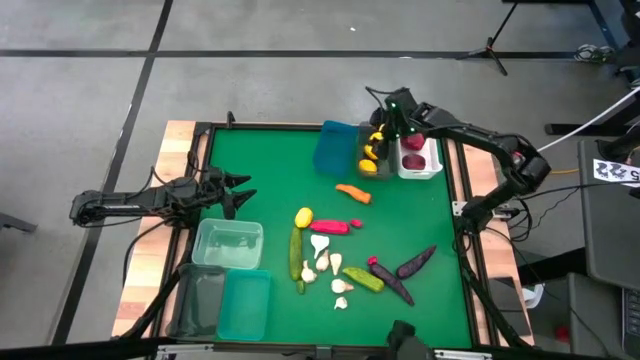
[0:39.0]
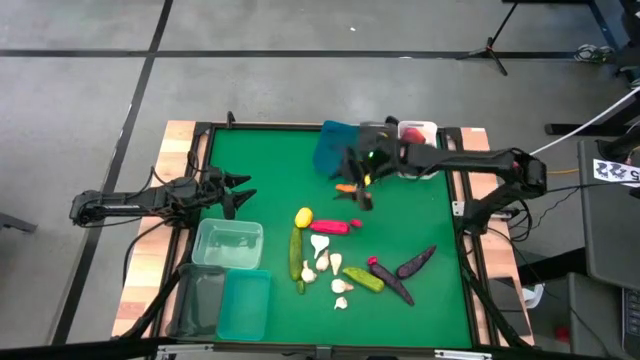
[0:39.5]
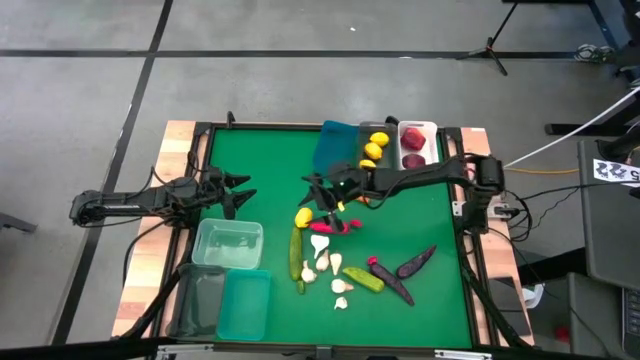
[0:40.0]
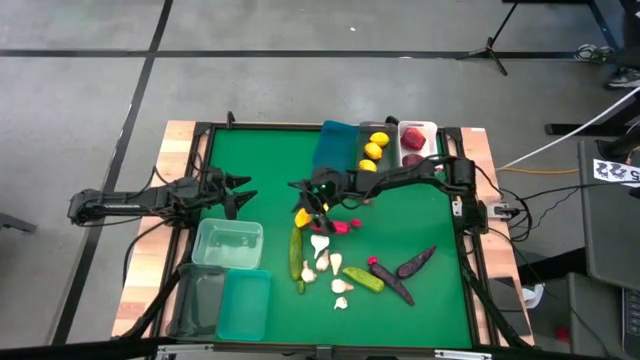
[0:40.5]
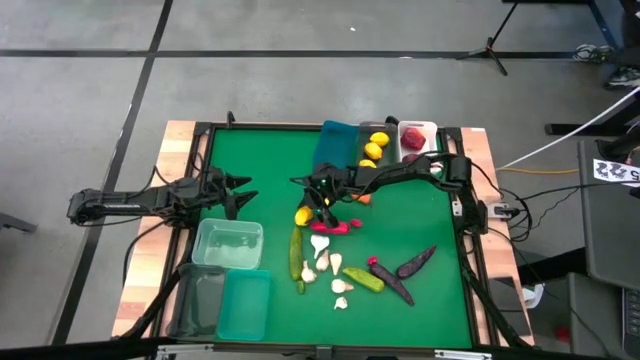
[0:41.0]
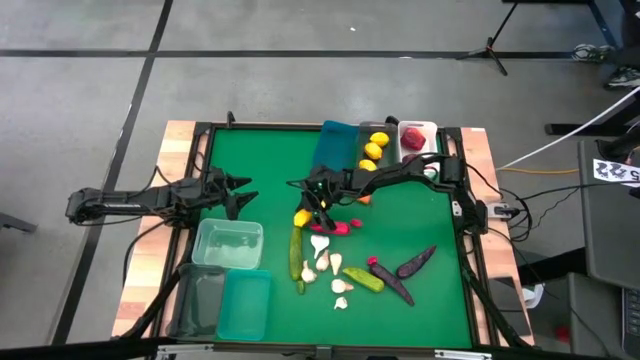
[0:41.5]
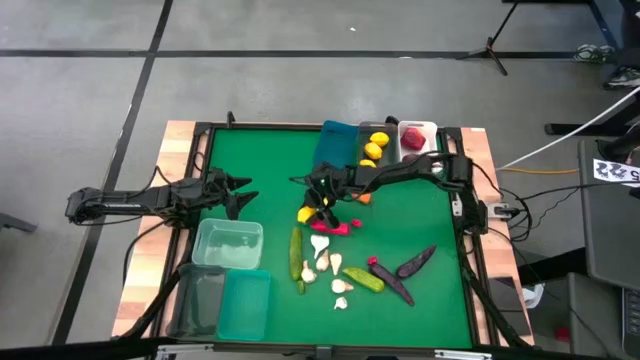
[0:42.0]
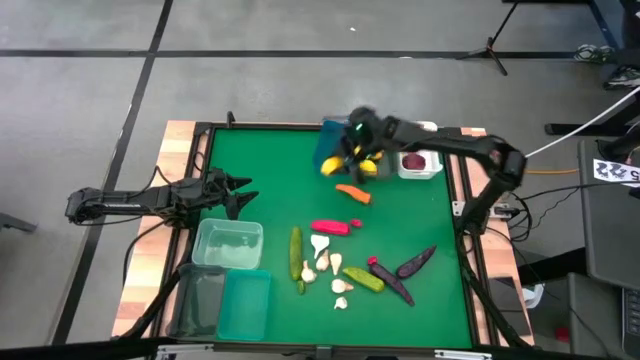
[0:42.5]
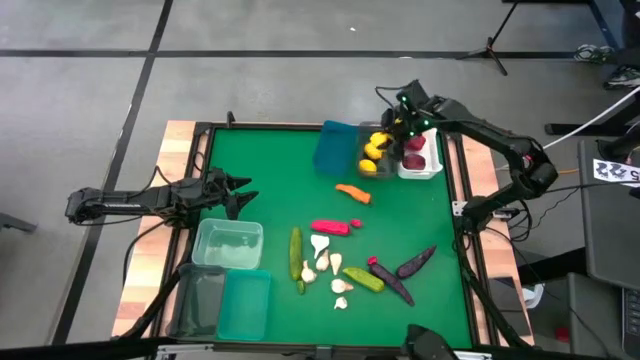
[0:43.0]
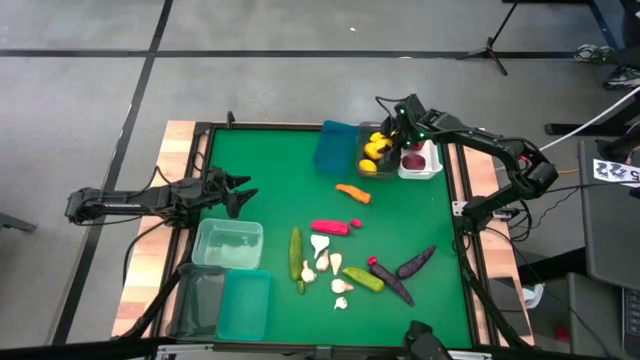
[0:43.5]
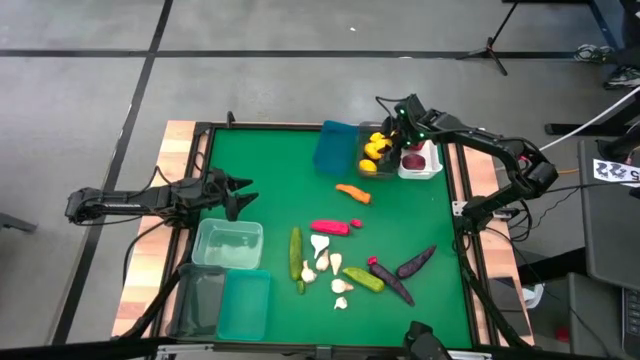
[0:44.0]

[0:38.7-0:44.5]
Task: Sort produce into baskets
Put the yellow lemon into the black bin

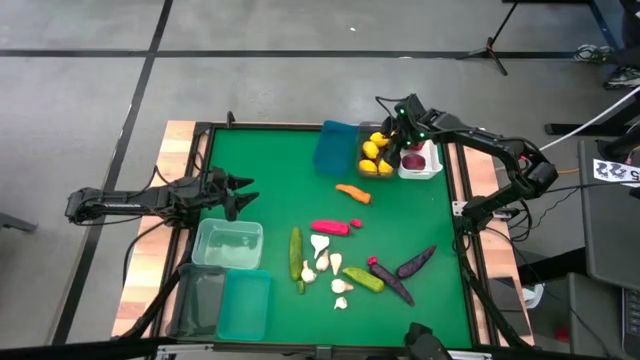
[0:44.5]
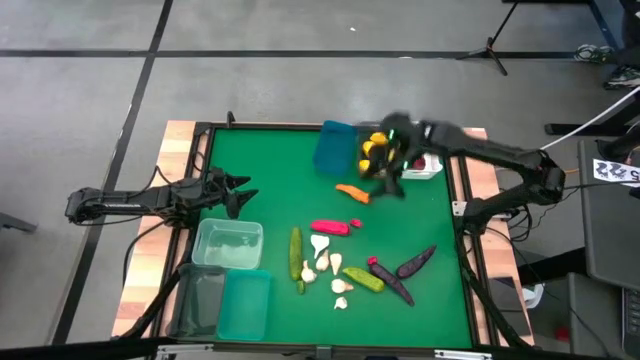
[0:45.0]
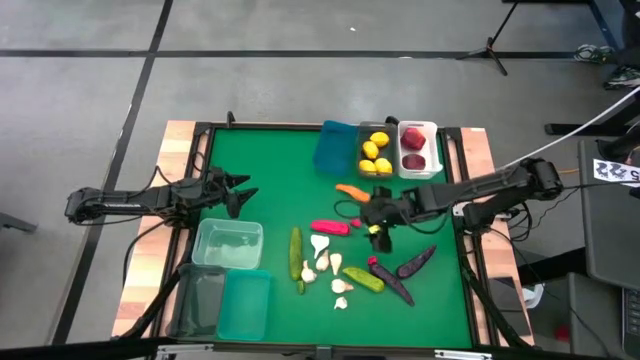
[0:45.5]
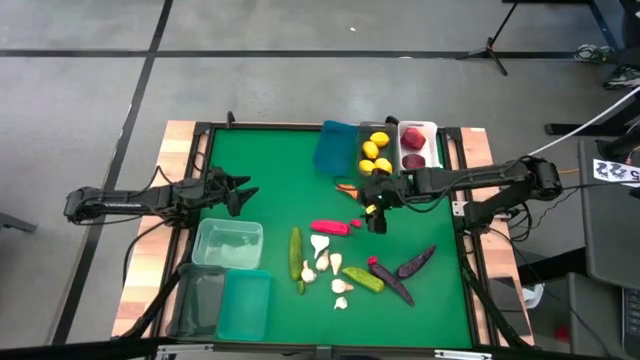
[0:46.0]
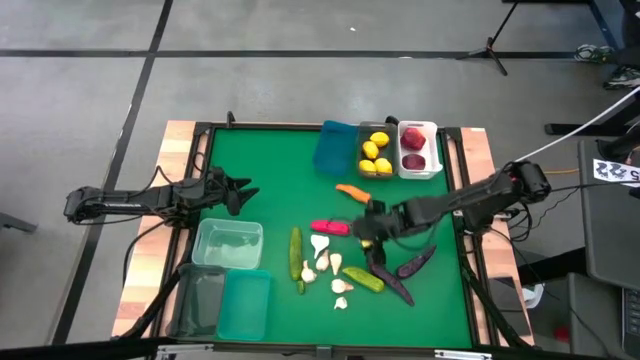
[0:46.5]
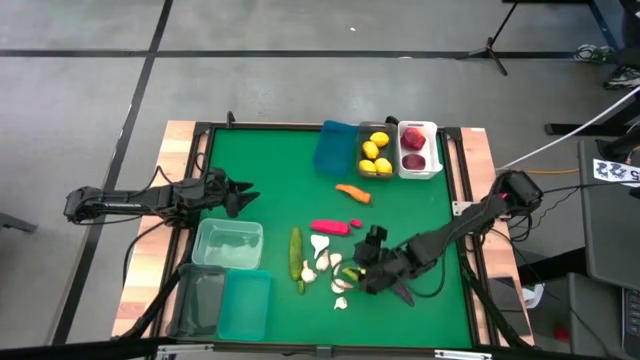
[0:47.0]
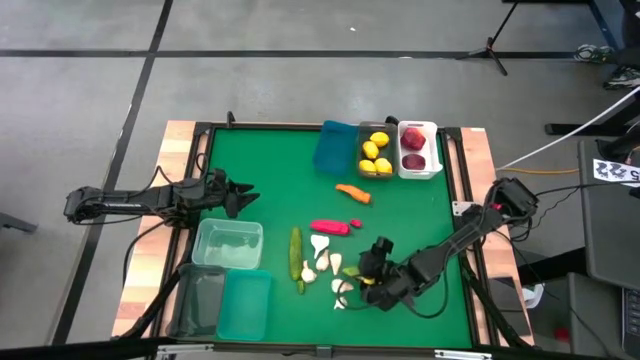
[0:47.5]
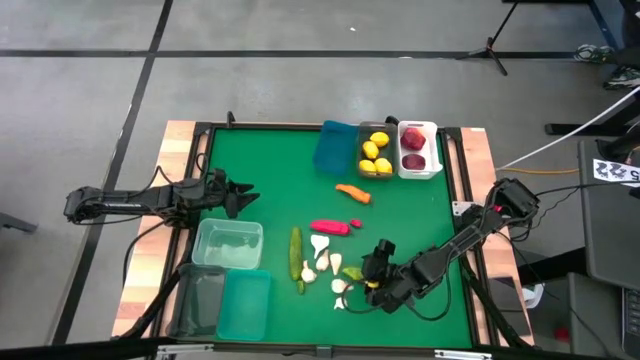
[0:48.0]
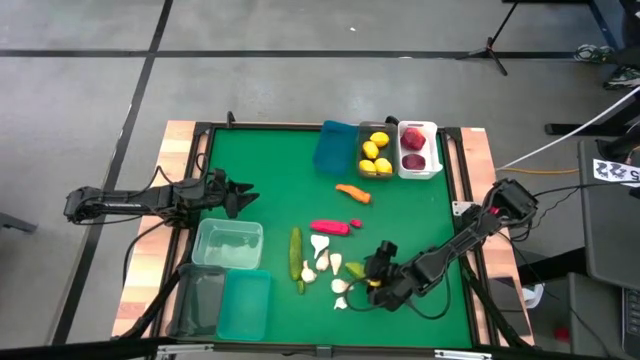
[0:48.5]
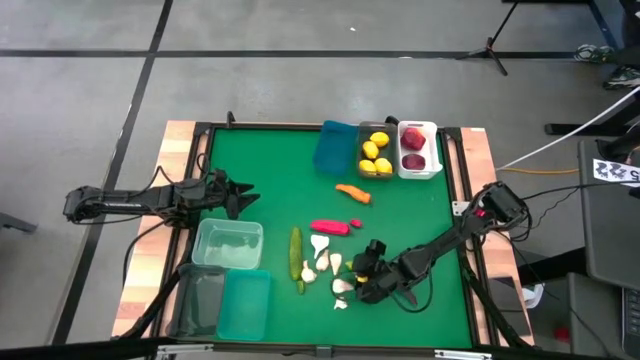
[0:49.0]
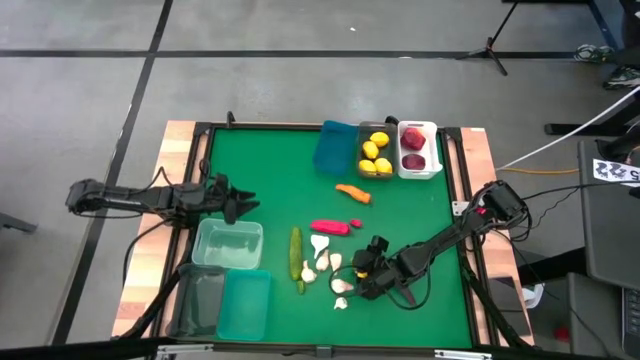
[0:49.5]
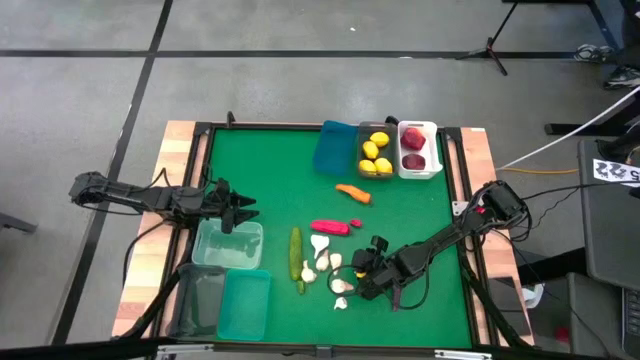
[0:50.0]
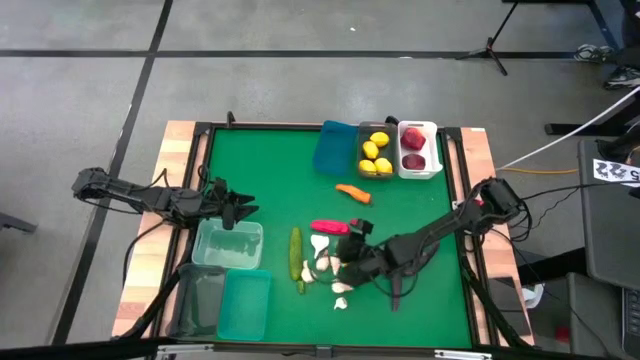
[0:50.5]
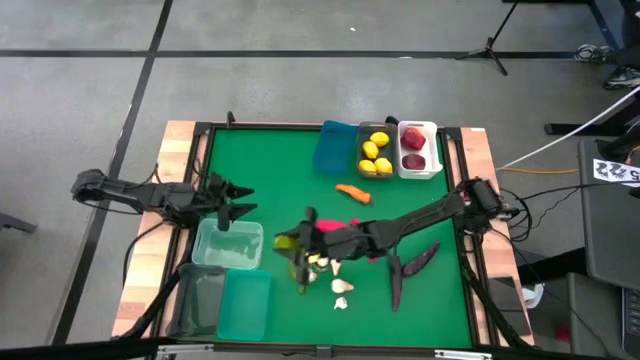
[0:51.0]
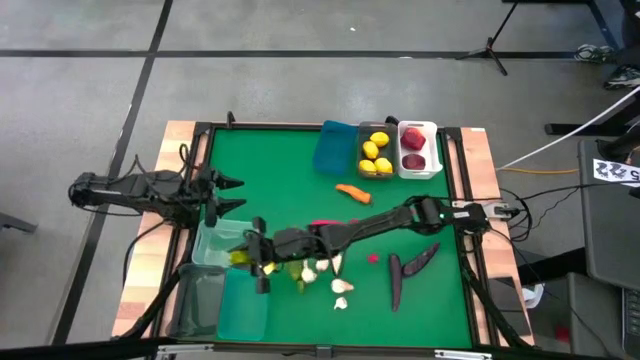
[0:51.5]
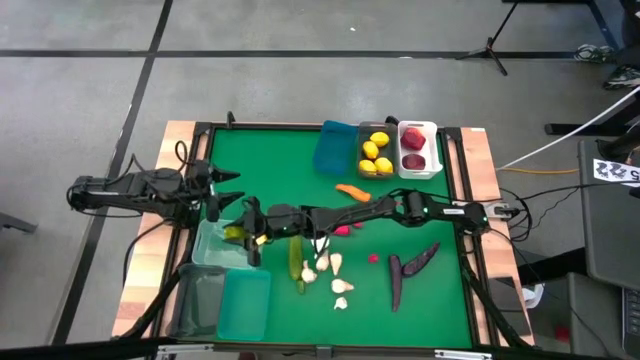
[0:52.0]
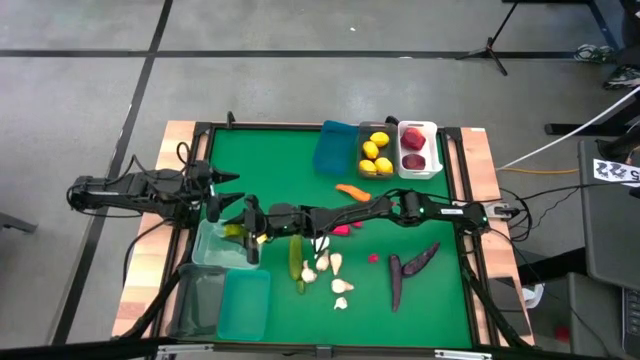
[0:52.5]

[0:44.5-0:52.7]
Put the green cucumber into the transparent bin

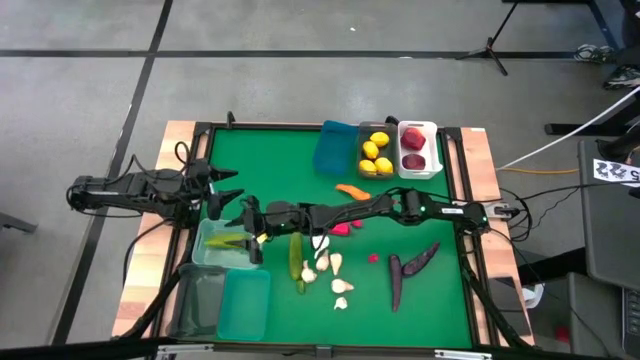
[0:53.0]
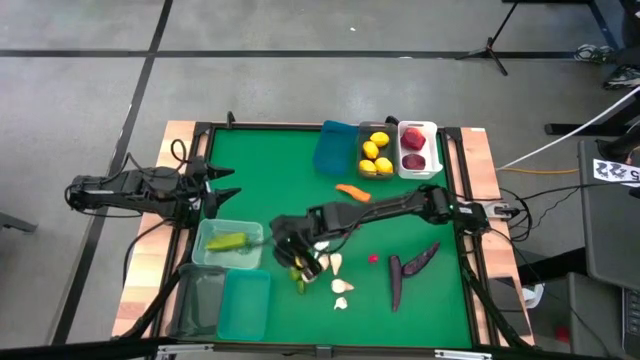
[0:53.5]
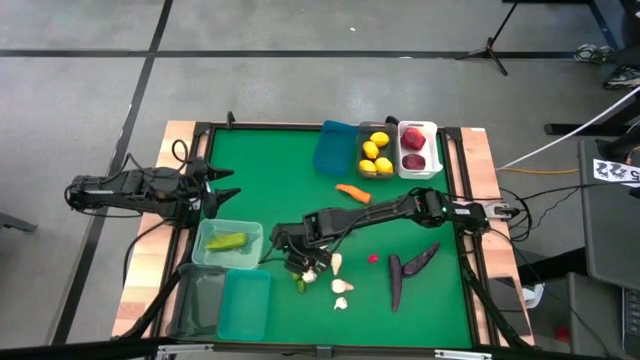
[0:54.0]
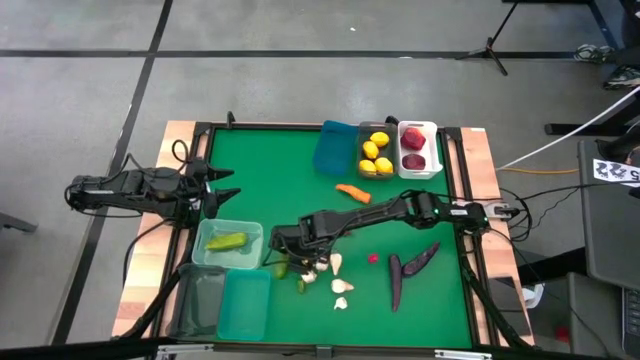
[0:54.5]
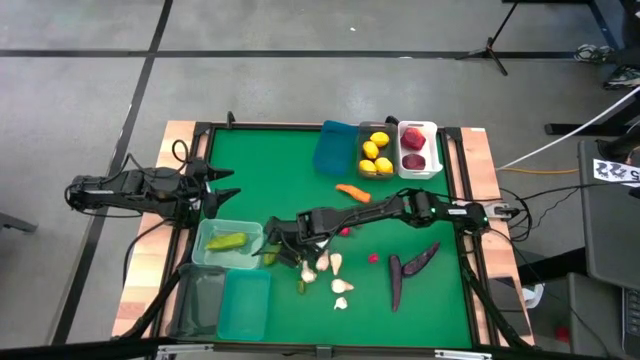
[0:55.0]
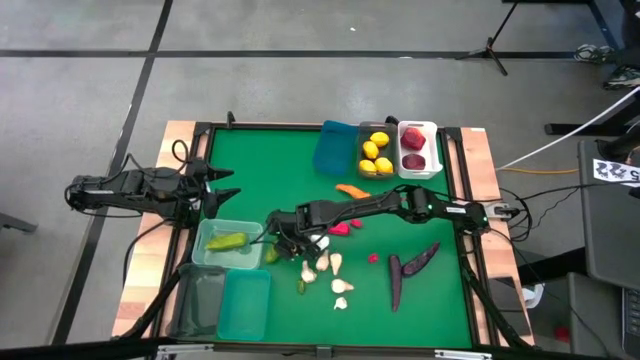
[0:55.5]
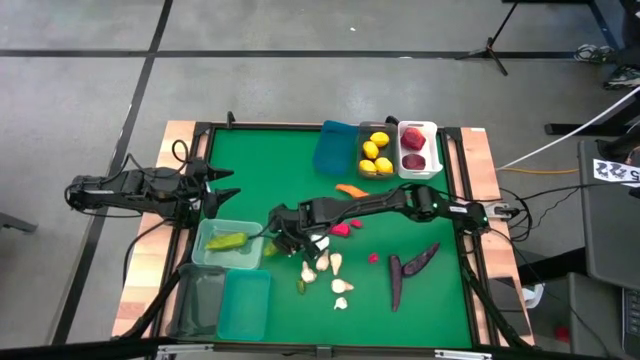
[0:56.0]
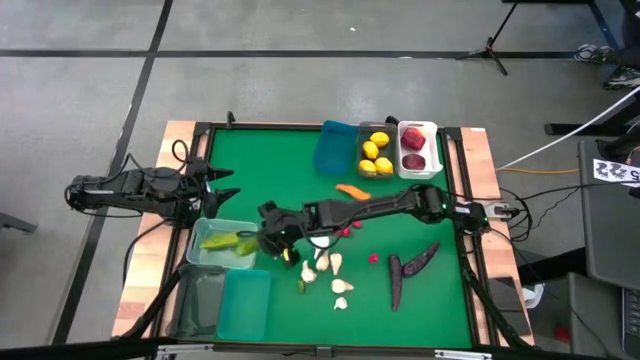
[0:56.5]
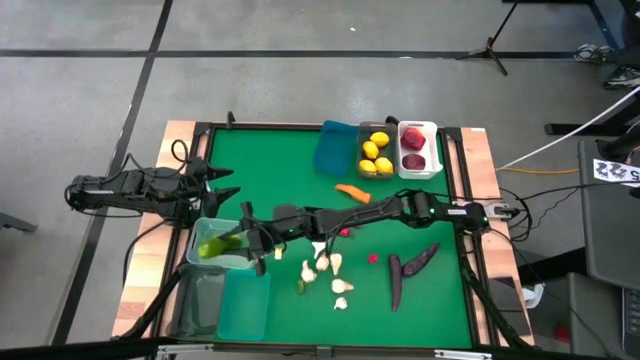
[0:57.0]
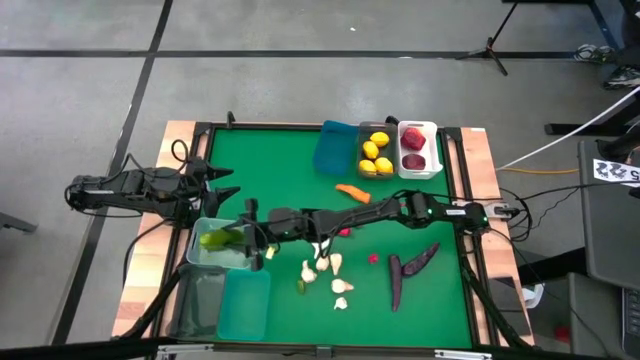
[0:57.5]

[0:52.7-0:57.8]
Put the green cucumber into the transparent bin

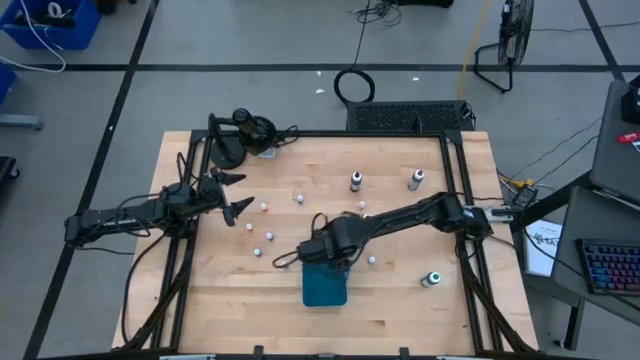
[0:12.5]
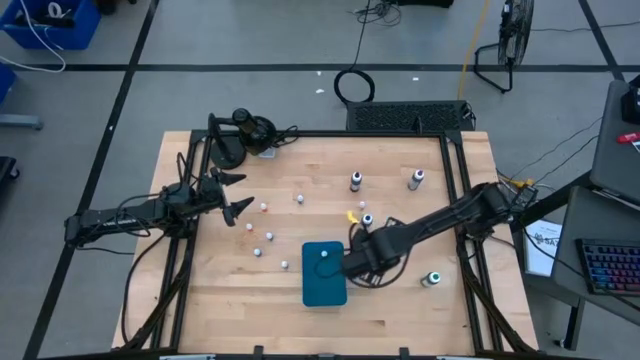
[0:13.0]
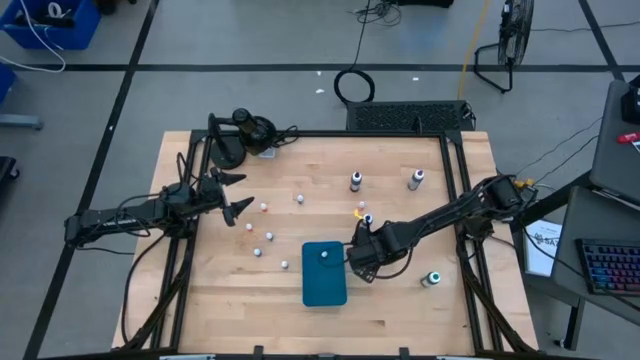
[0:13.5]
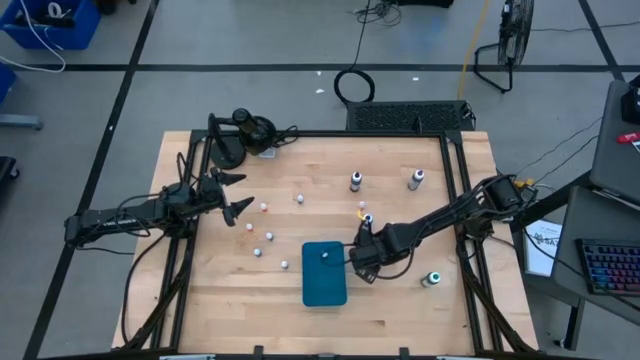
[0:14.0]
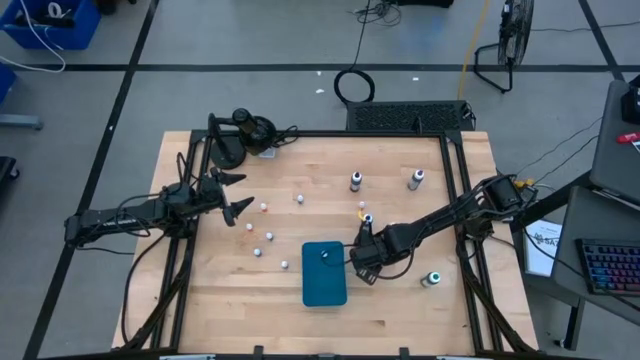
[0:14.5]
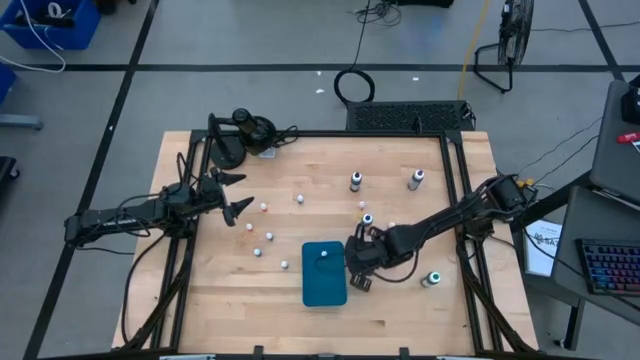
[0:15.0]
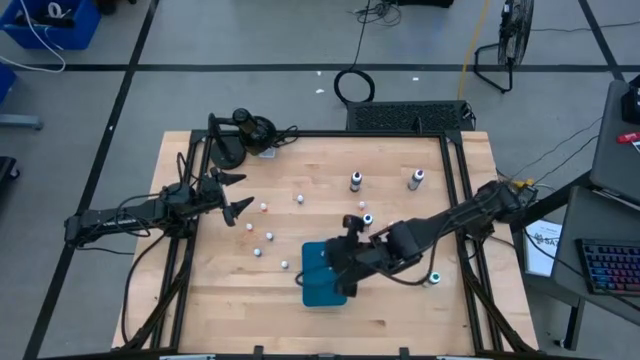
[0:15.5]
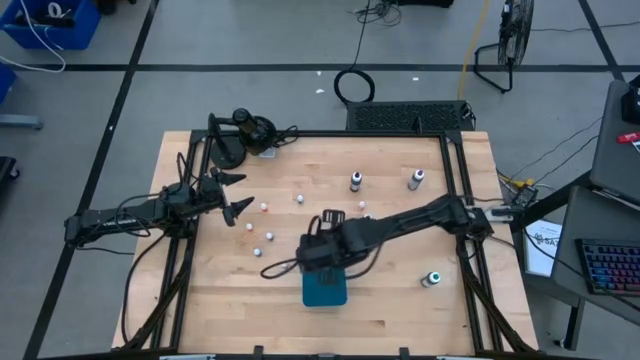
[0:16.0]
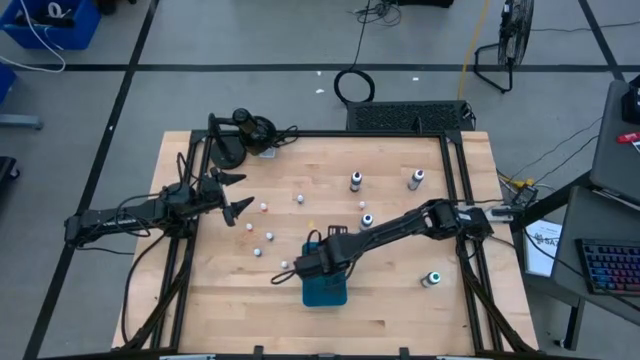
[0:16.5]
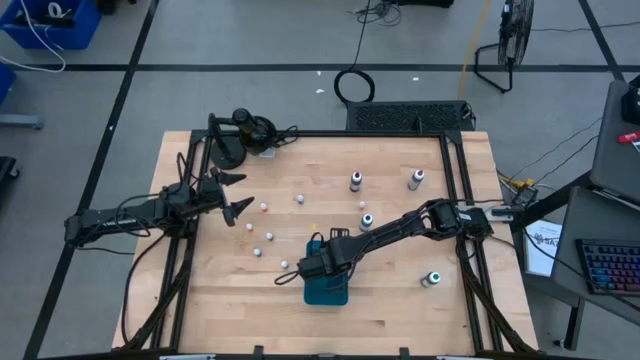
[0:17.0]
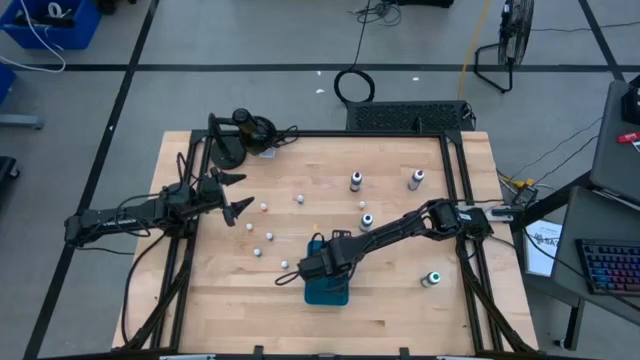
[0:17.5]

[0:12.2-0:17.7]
Task: Pick & Place food coloring
Put the purple small food coloring bottle into the blue bin
